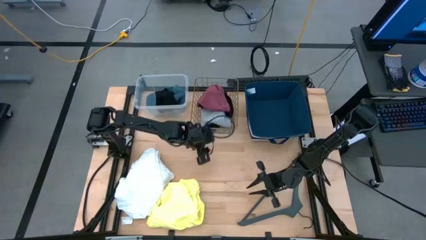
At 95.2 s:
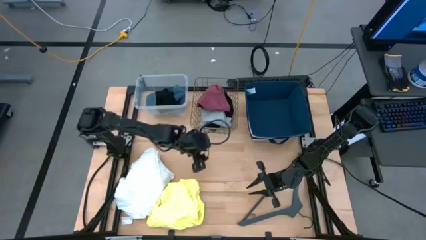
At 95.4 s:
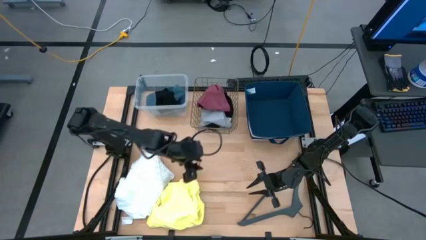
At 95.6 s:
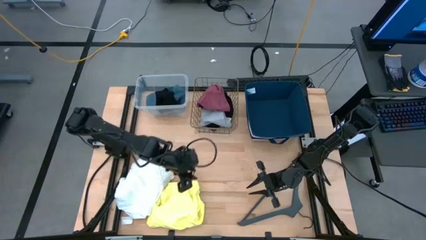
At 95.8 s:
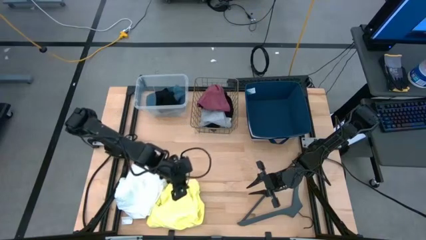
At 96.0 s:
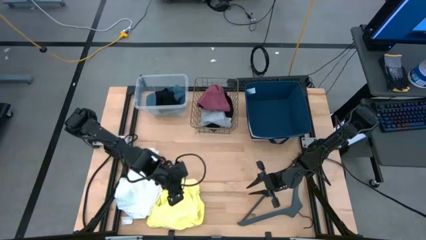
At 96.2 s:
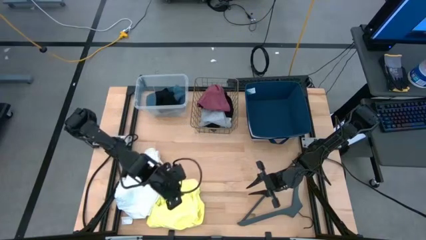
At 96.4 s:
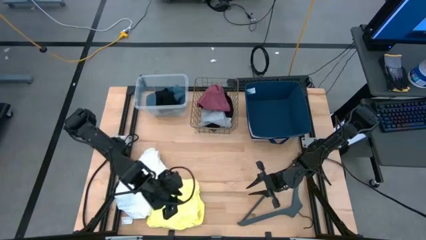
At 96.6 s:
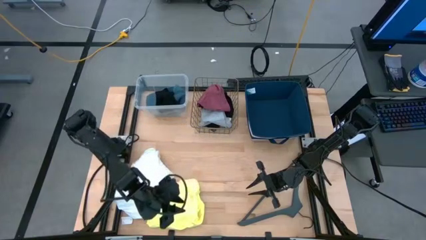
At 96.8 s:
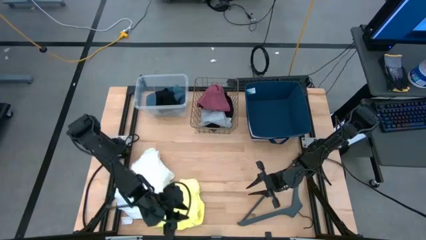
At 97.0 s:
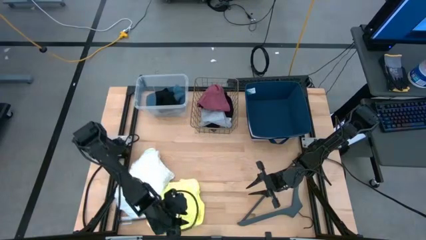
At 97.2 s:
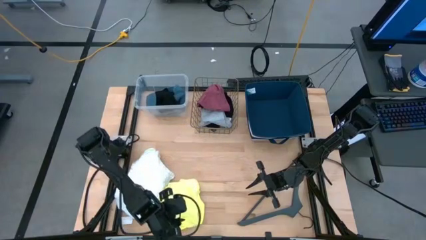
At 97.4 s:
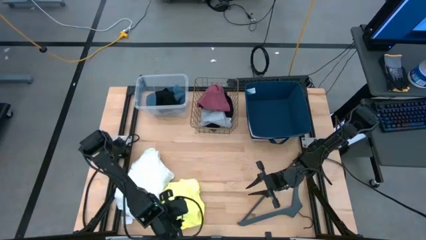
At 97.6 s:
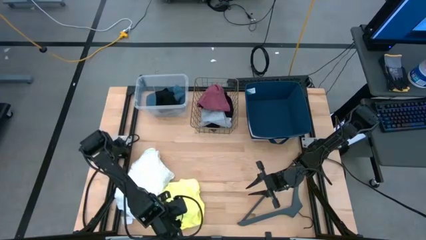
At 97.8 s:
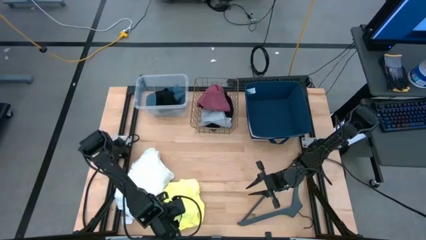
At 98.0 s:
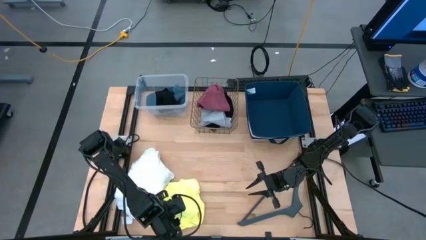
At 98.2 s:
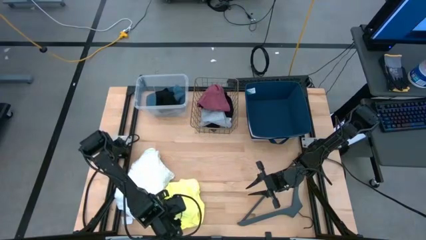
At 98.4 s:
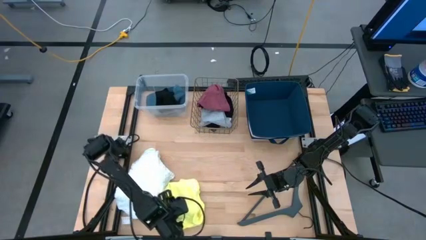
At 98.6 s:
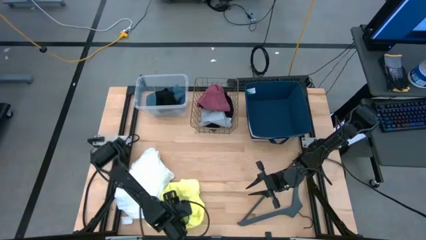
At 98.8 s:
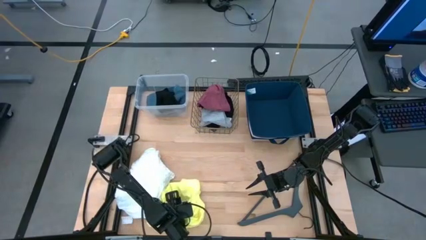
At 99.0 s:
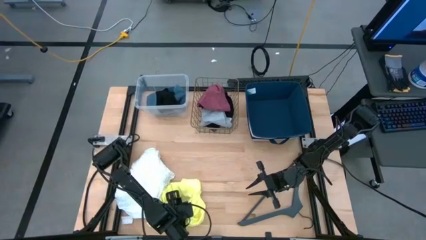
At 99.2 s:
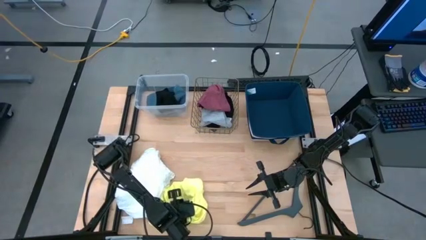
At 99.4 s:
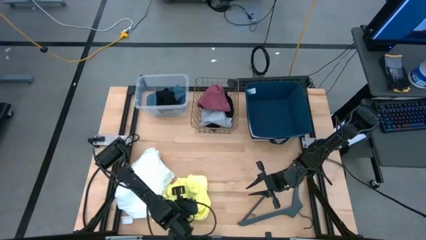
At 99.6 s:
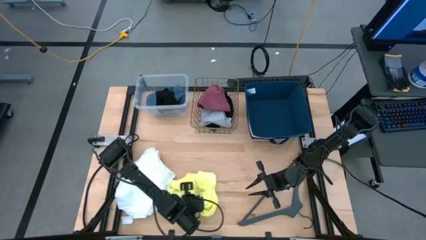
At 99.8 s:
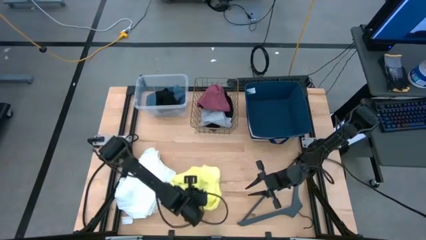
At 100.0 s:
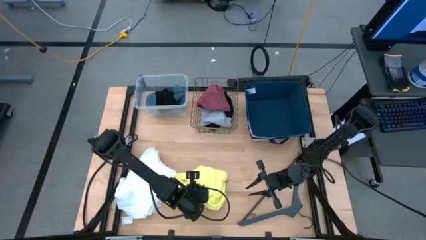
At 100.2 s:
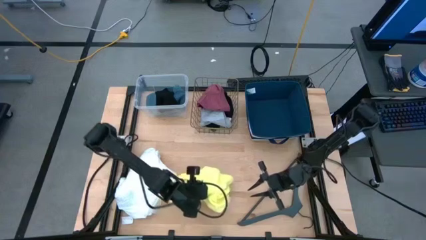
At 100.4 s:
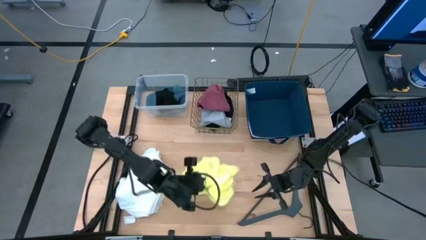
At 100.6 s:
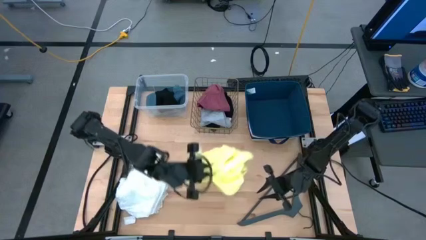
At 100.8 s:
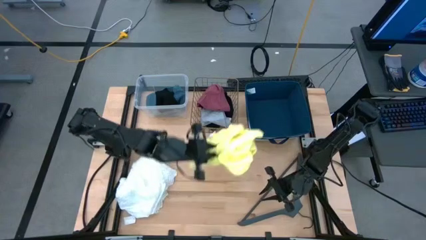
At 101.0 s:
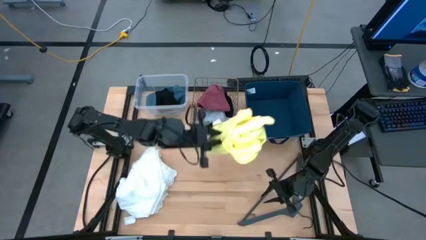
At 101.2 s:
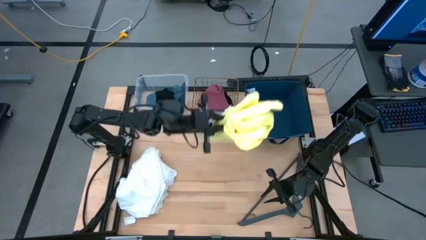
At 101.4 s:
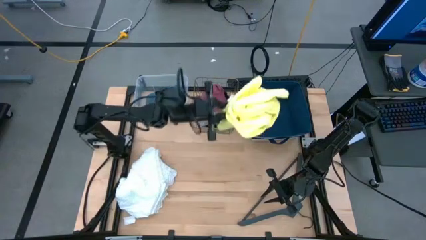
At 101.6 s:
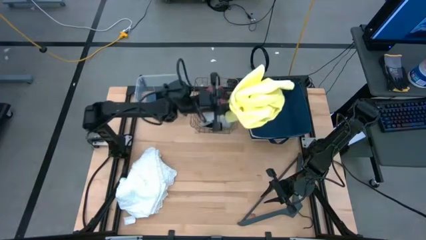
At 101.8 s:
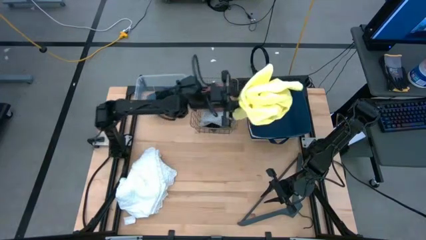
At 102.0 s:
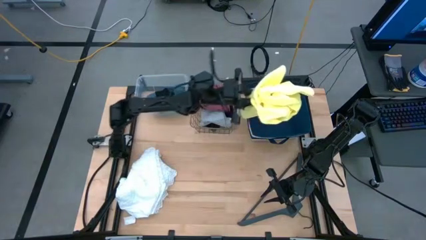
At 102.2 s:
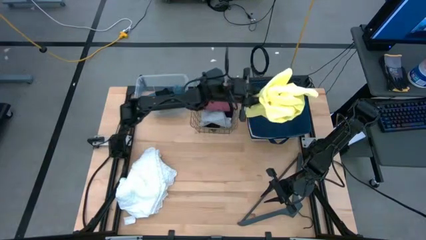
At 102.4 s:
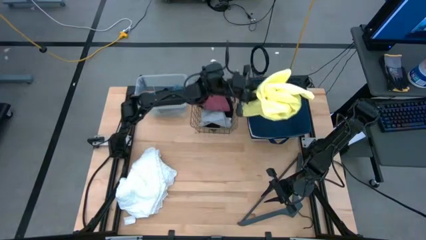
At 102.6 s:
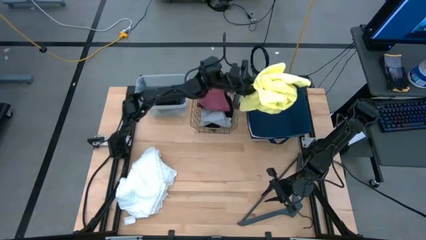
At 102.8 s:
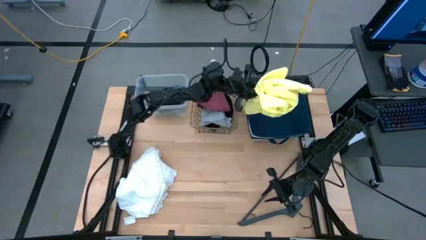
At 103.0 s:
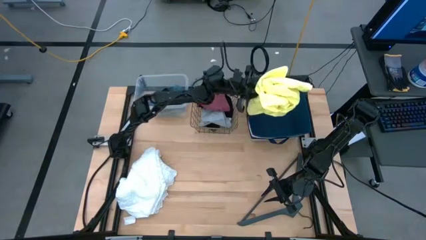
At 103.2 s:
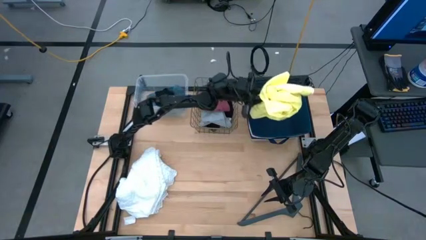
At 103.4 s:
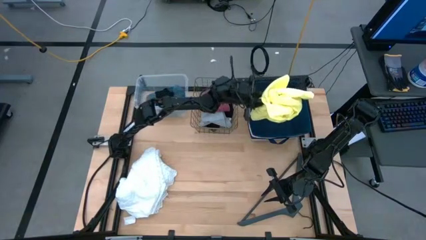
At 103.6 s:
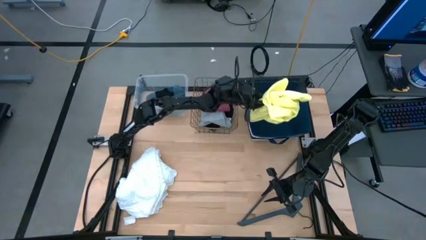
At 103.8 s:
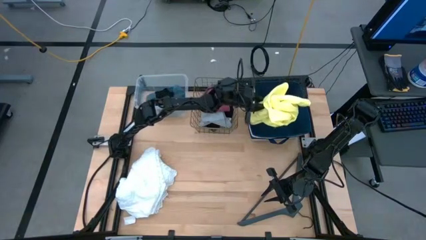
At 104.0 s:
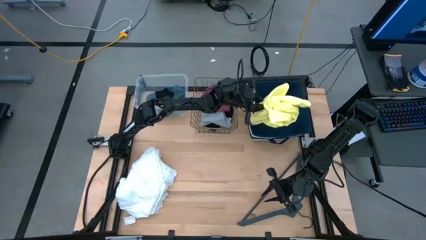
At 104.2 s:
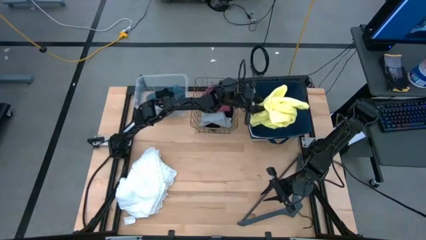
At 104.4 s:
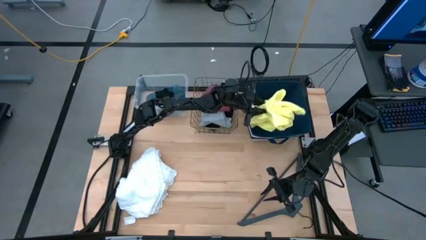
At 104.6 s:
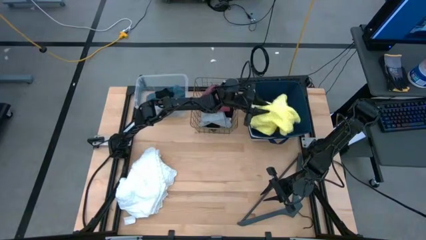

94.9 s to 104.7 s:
Task: Pick & Place Cloths
Put the yellow shirt into the white and blue bin

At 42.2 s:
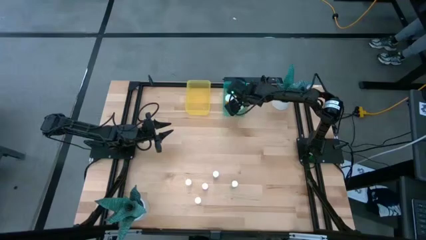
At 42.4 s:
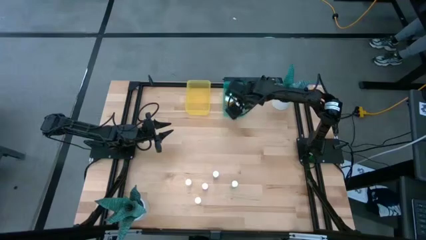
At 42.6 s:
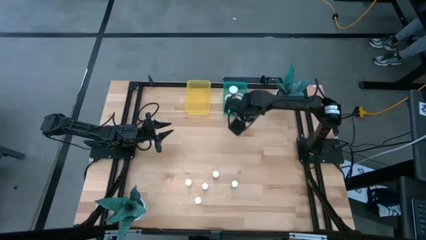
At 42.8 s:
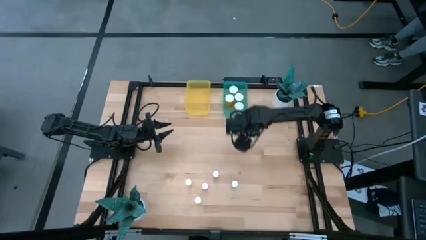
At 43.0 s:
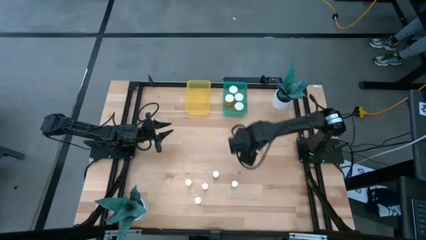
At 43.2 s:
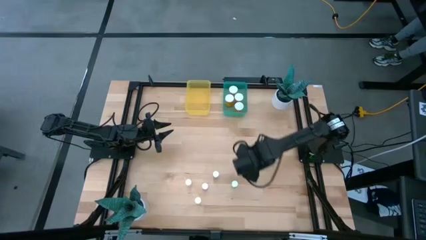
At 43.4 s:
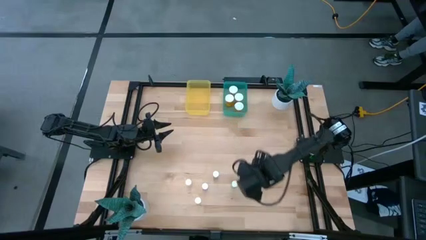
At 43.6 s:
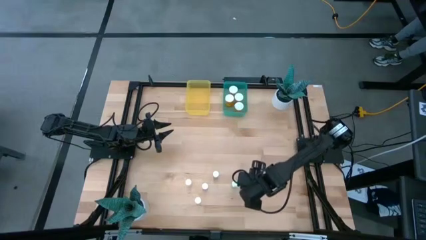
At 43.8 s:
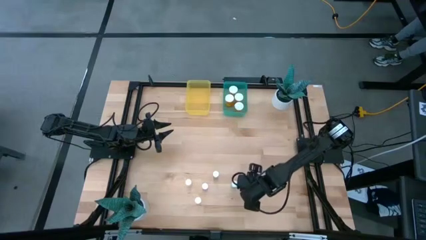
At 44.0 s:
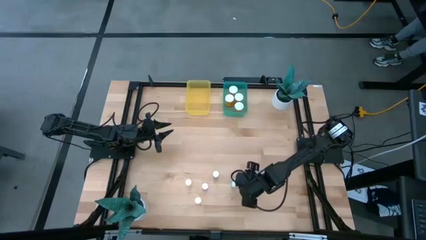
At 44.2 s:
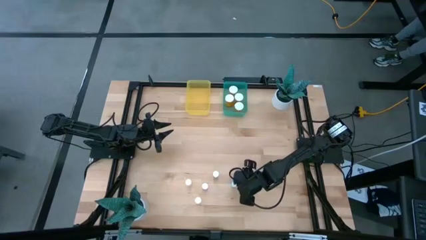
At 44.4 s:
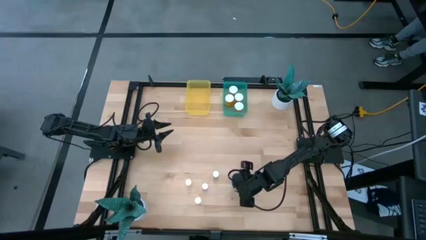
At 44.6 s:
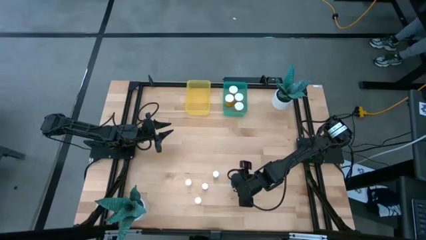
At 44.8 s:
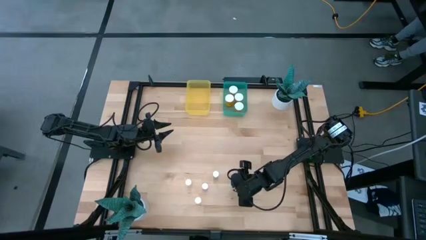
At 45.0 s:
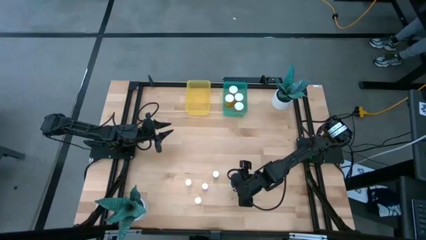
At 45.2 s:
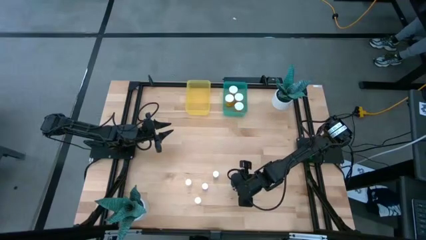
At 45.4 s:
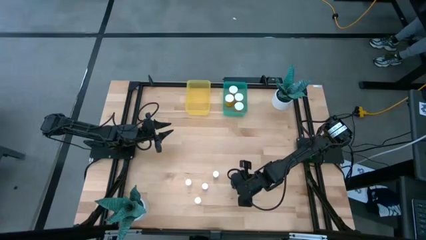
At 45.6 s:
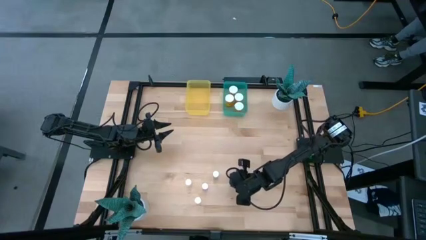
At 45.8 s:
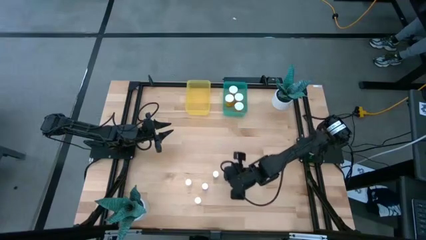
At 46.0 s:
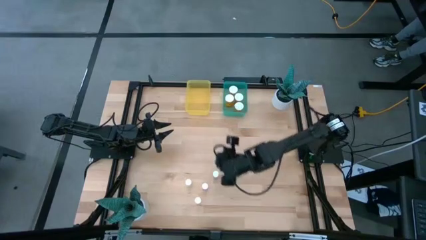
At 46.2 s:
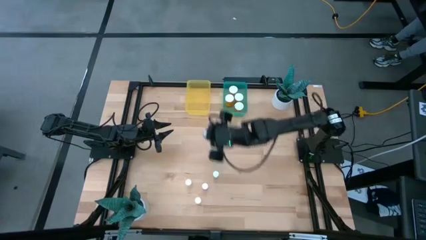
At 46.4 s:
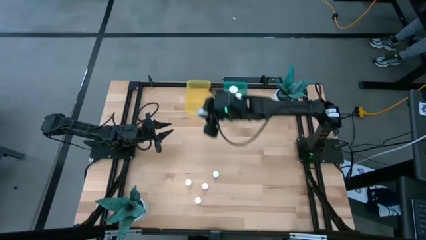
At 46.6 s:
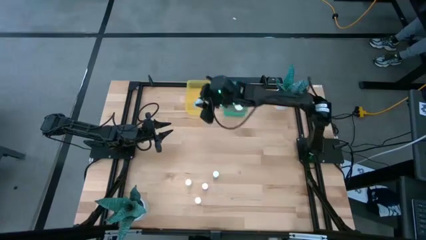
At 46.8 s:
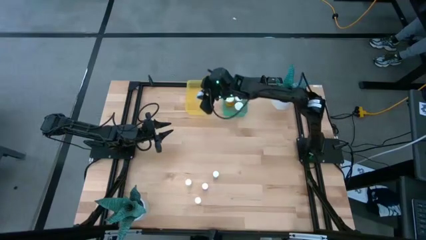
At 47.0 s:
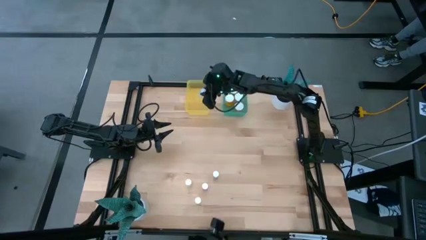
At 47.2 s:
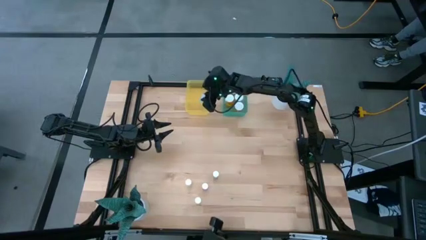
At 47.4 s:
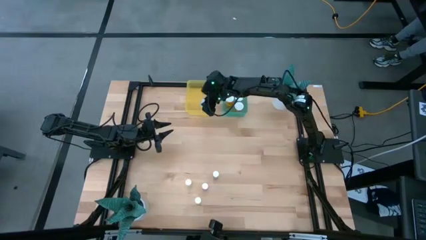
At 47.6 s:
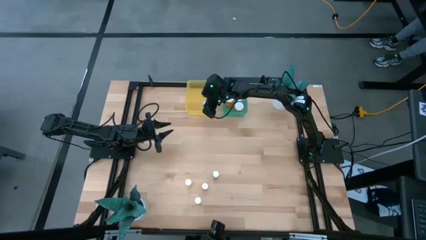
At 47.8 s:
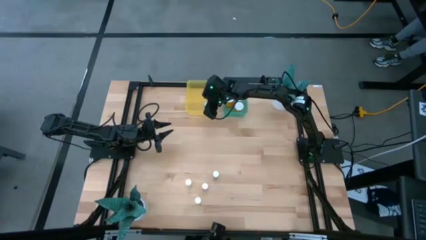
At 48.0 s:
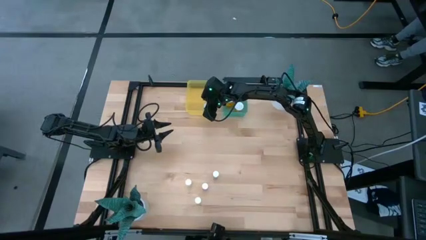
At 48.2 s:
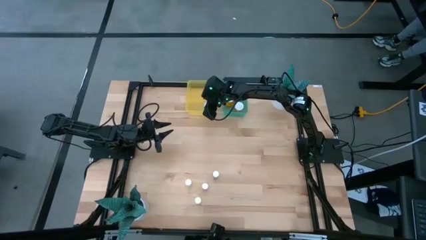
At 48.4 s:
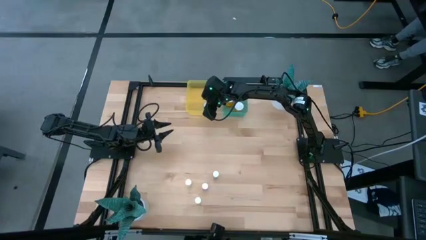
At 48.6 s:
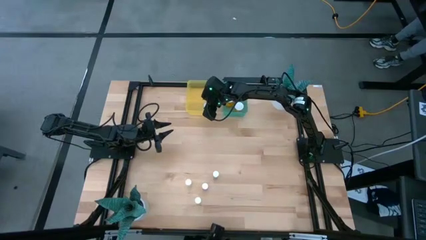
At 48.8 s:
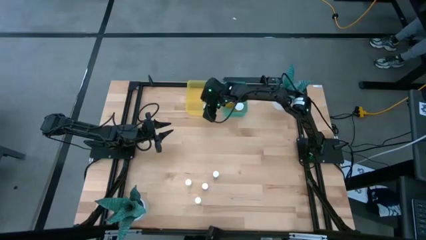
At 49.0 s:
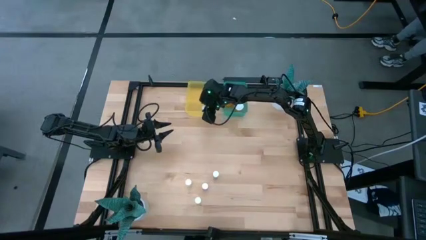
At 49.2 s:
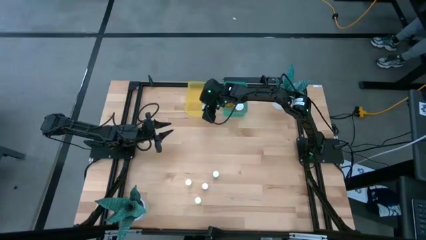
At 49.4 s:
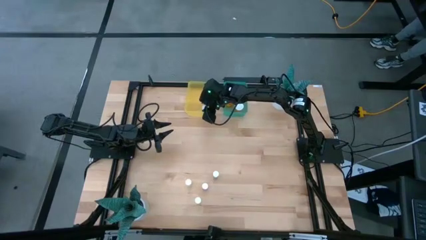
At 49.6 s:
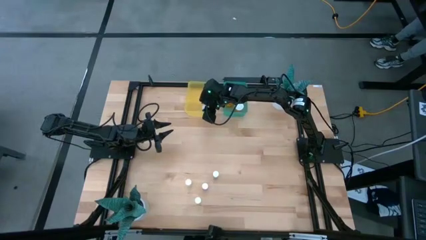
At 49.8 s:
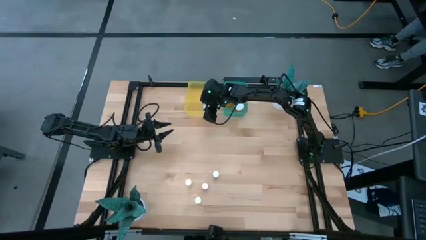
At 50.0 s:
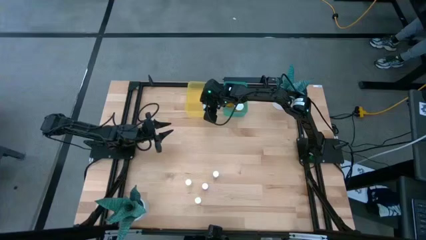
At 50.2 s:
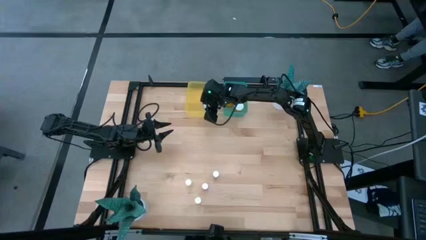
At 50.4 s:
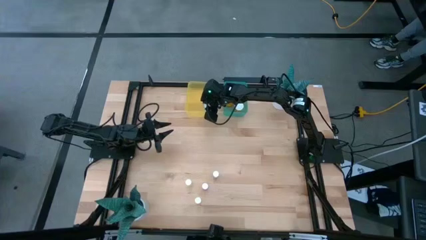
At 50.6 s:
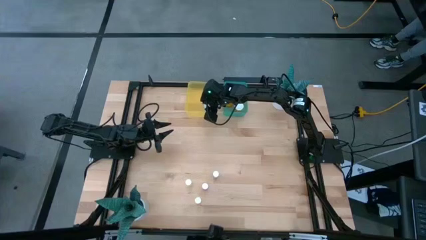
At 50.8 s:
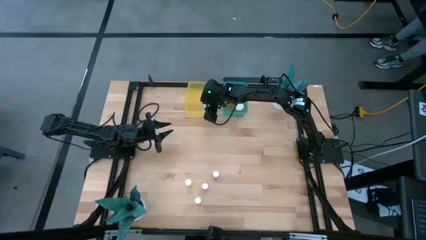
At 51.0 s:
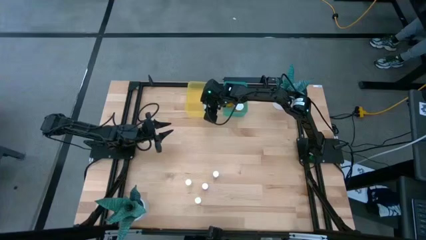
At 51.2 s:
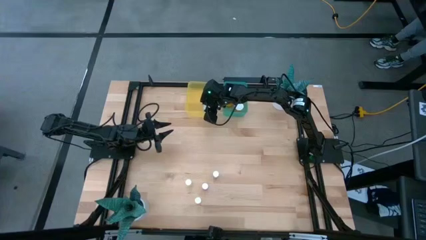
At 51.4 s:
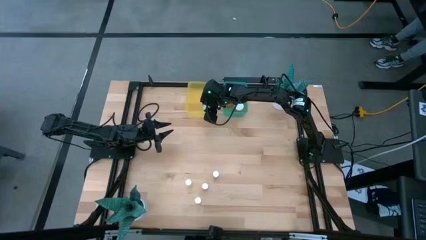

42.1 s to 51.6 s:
Task: Pick and place medicine bottles into bin by pill shape (circle, oval)
Put the blue tablet bottle into the yellow bin
